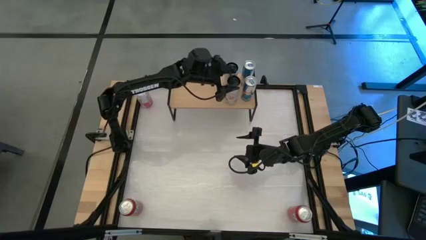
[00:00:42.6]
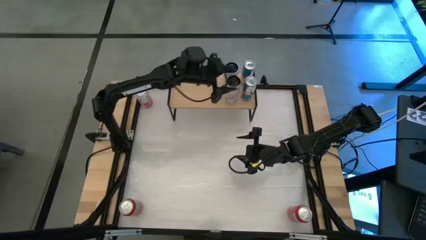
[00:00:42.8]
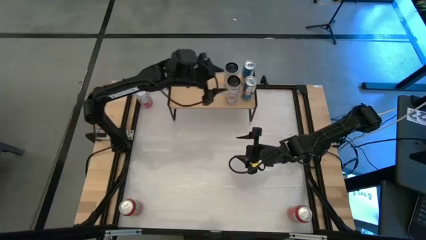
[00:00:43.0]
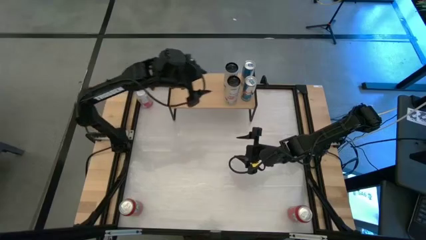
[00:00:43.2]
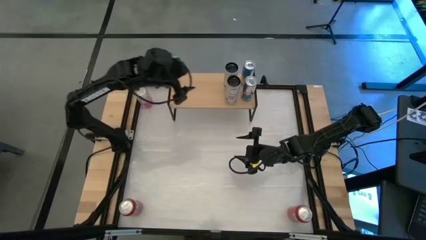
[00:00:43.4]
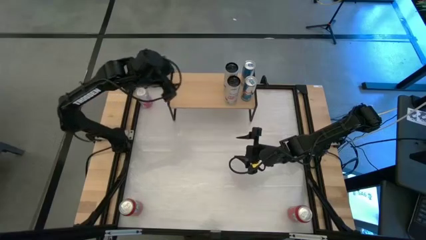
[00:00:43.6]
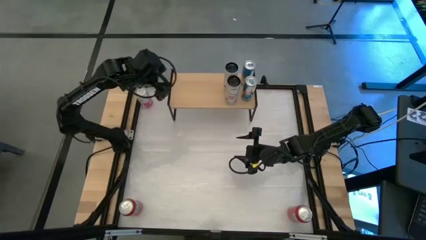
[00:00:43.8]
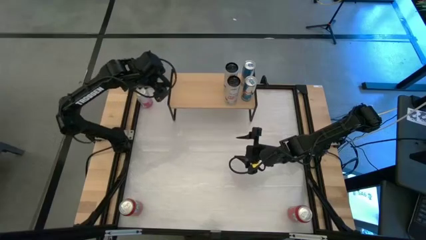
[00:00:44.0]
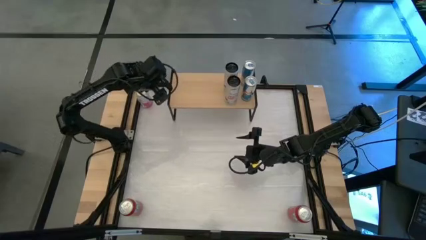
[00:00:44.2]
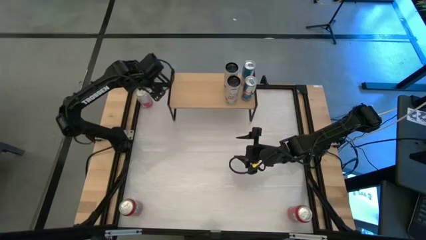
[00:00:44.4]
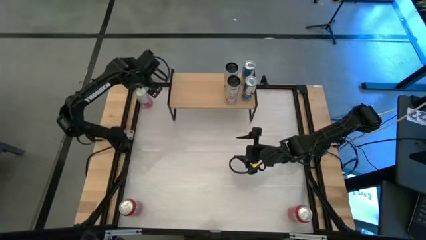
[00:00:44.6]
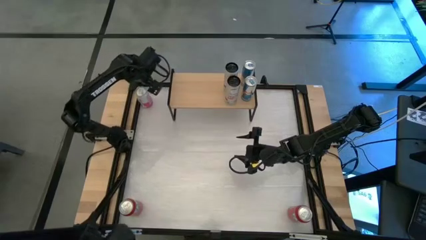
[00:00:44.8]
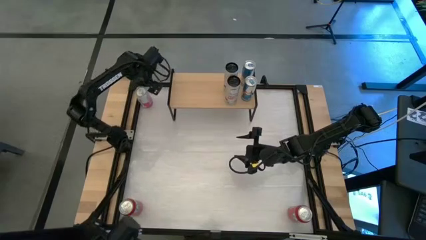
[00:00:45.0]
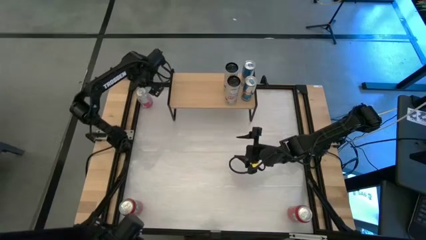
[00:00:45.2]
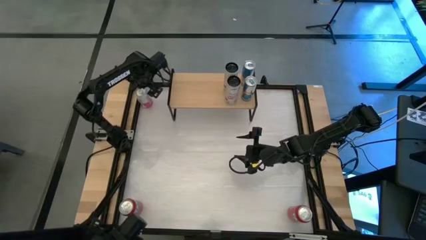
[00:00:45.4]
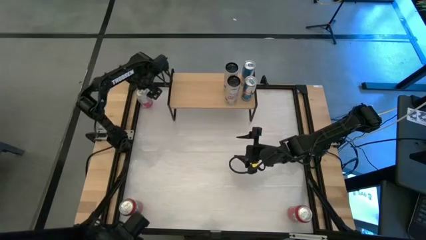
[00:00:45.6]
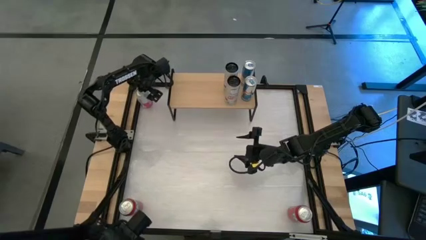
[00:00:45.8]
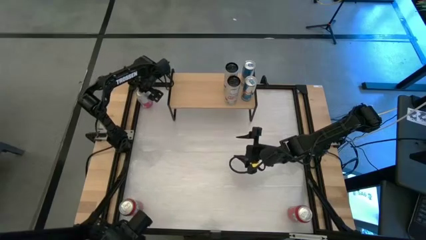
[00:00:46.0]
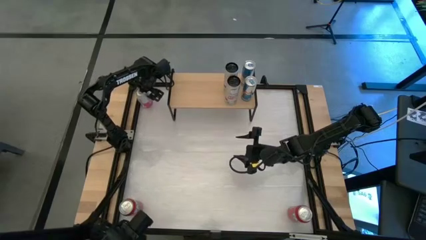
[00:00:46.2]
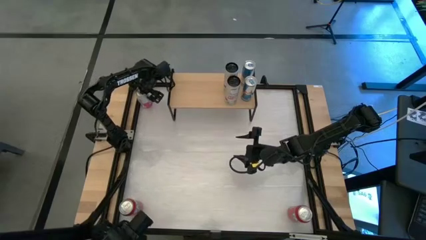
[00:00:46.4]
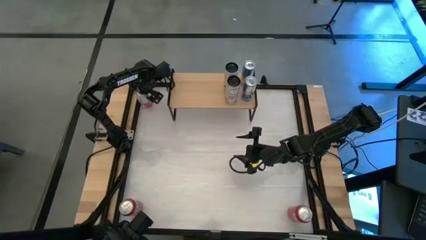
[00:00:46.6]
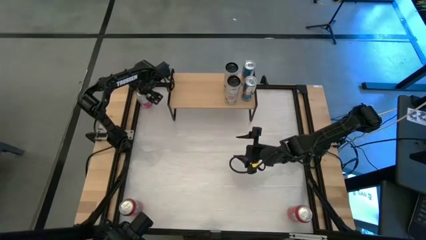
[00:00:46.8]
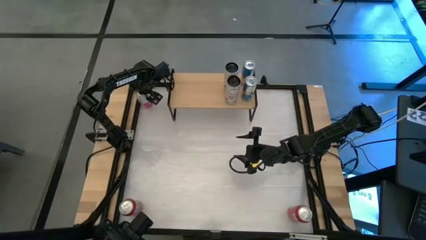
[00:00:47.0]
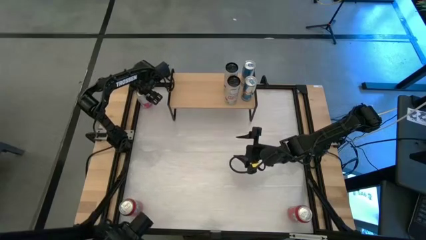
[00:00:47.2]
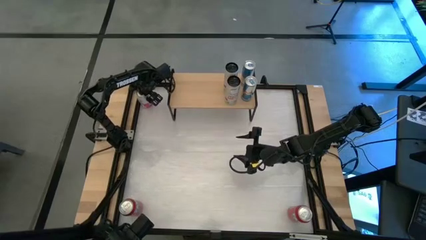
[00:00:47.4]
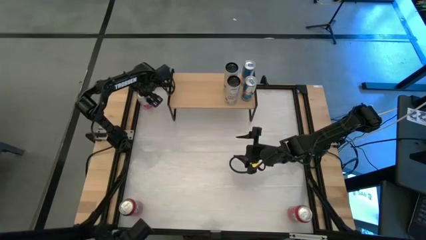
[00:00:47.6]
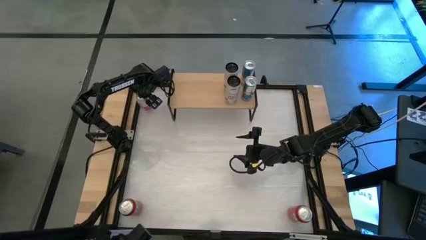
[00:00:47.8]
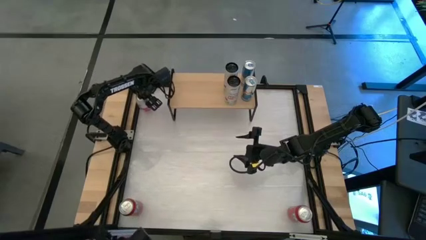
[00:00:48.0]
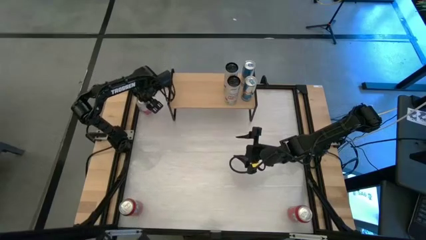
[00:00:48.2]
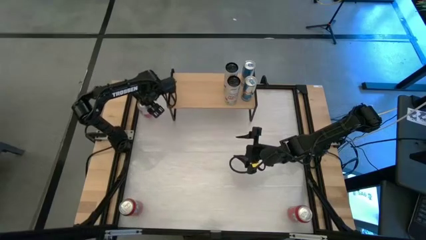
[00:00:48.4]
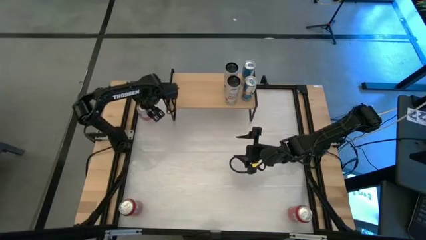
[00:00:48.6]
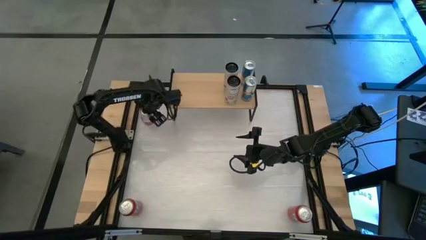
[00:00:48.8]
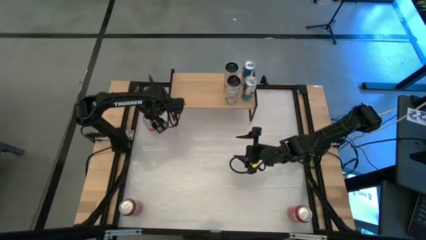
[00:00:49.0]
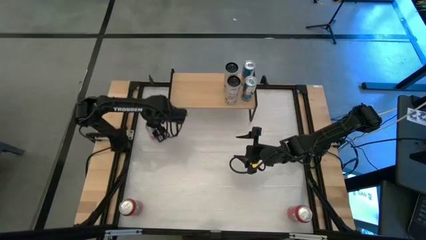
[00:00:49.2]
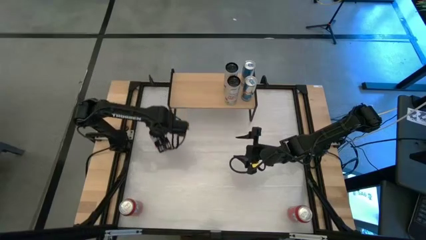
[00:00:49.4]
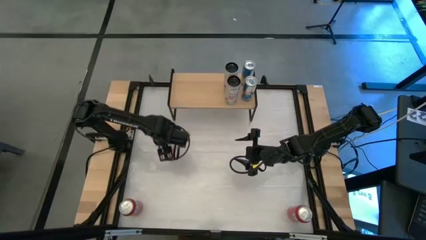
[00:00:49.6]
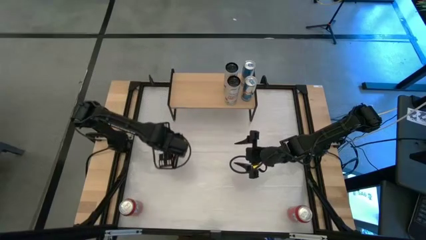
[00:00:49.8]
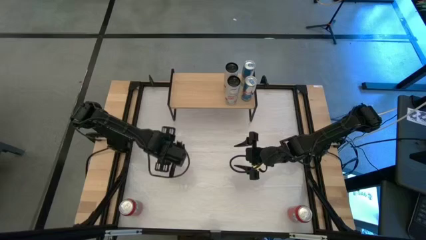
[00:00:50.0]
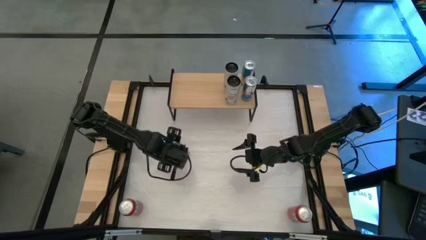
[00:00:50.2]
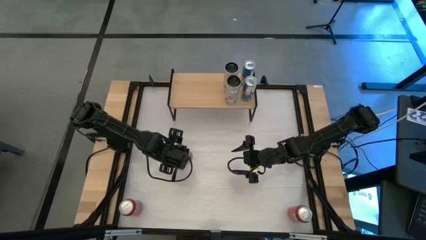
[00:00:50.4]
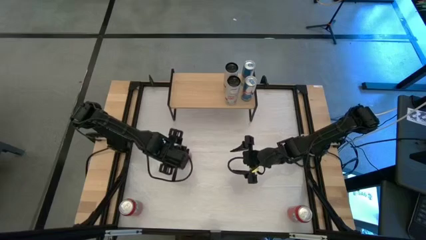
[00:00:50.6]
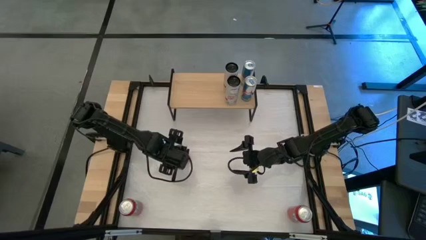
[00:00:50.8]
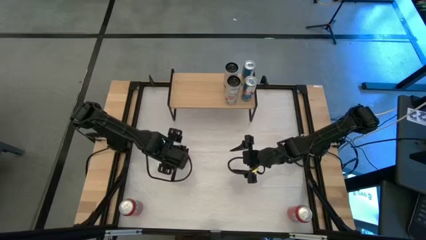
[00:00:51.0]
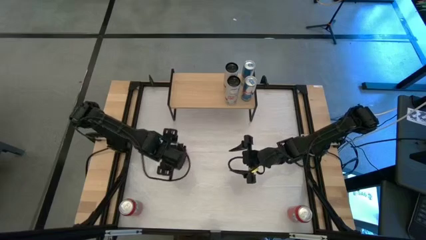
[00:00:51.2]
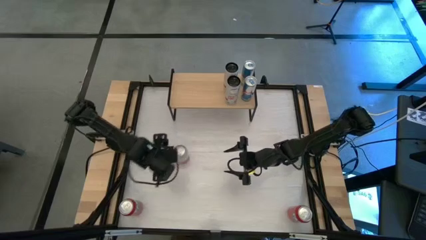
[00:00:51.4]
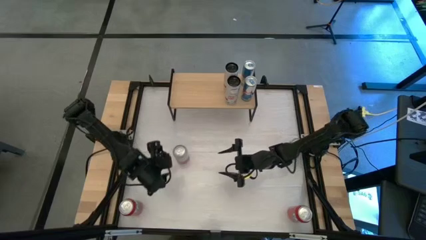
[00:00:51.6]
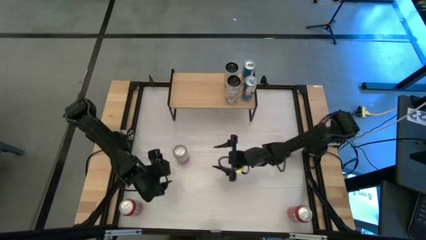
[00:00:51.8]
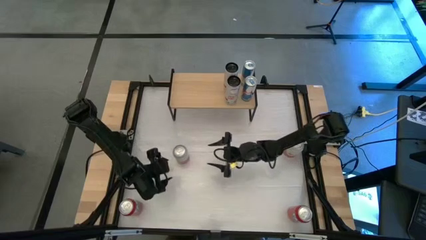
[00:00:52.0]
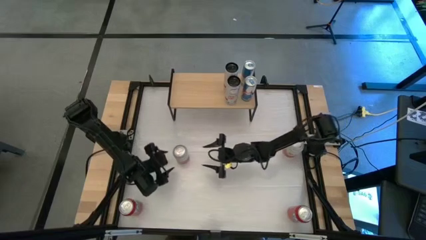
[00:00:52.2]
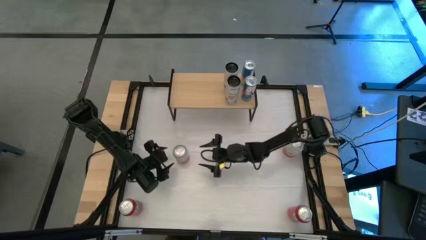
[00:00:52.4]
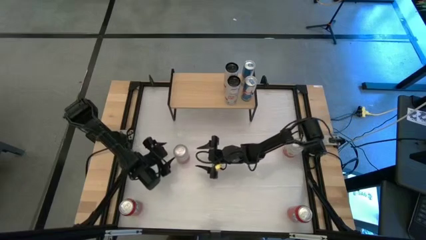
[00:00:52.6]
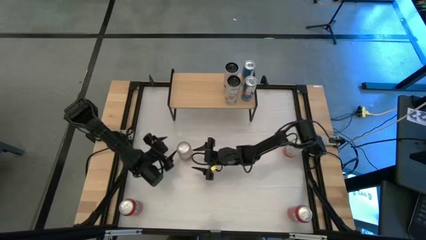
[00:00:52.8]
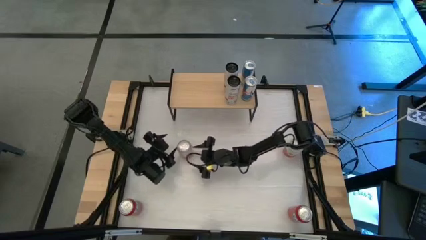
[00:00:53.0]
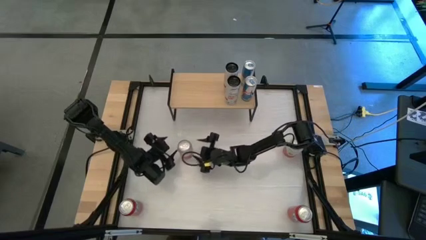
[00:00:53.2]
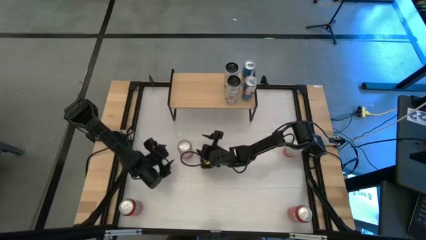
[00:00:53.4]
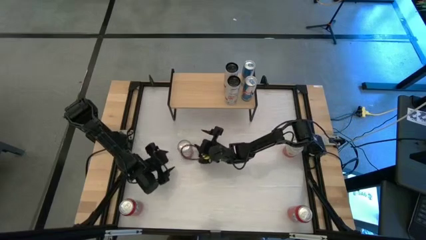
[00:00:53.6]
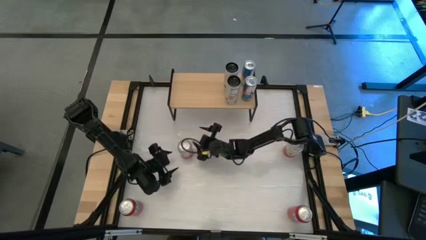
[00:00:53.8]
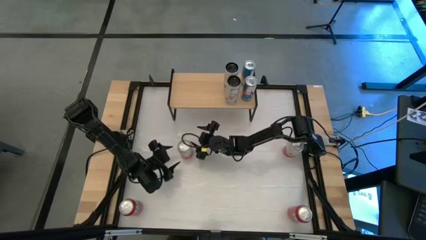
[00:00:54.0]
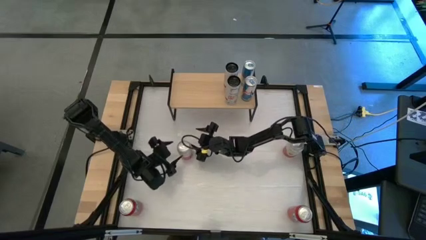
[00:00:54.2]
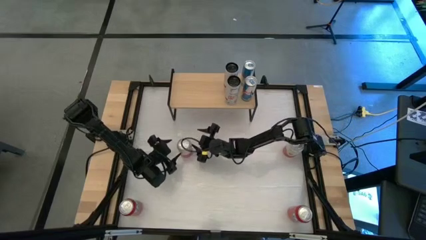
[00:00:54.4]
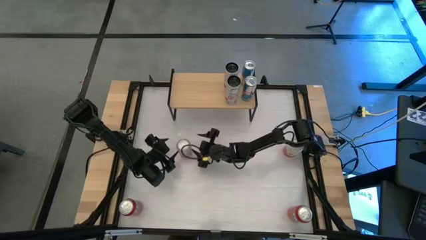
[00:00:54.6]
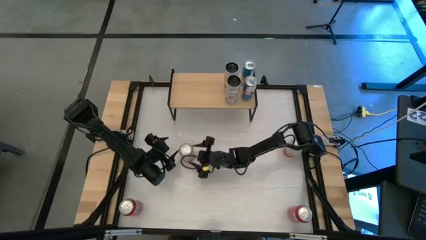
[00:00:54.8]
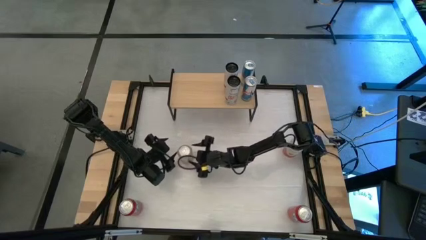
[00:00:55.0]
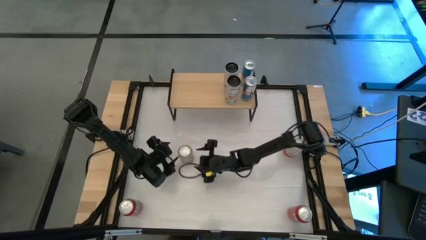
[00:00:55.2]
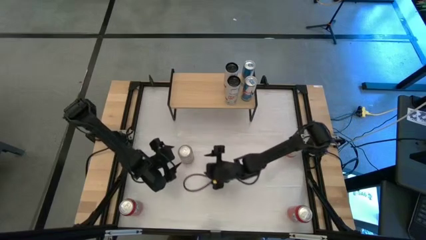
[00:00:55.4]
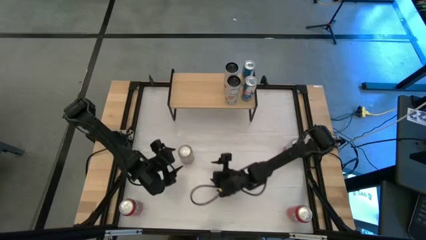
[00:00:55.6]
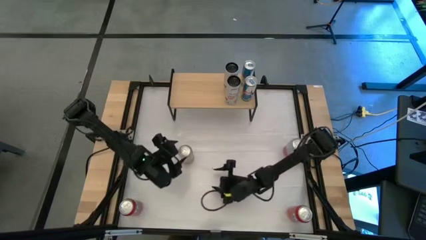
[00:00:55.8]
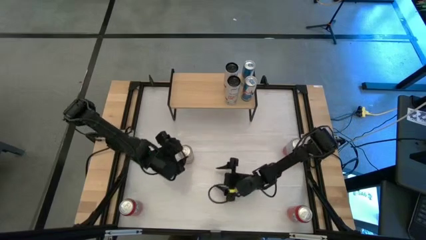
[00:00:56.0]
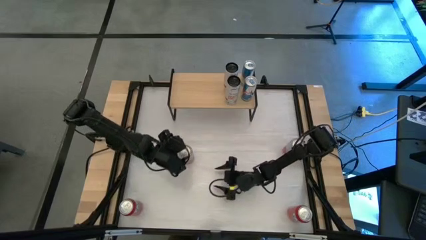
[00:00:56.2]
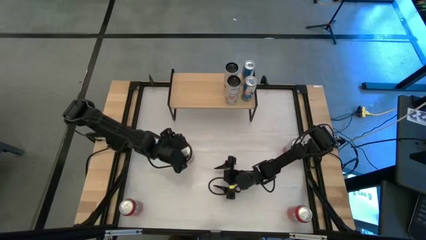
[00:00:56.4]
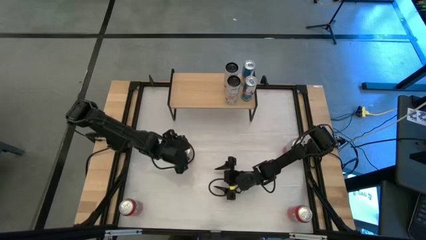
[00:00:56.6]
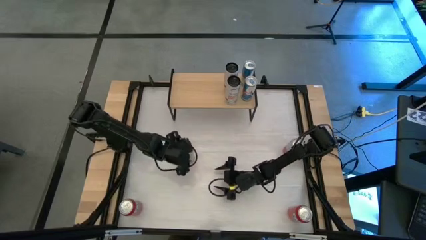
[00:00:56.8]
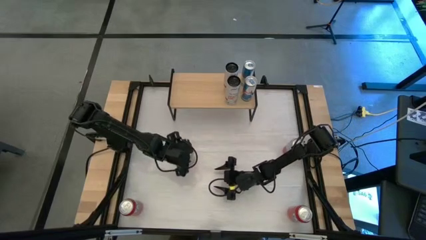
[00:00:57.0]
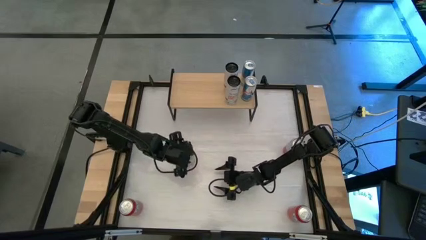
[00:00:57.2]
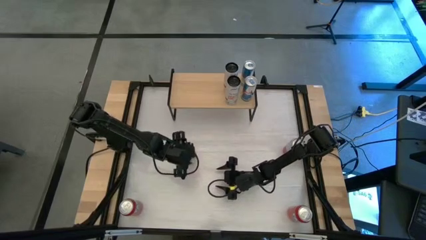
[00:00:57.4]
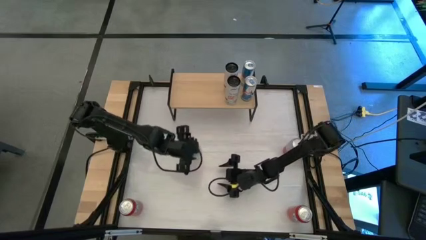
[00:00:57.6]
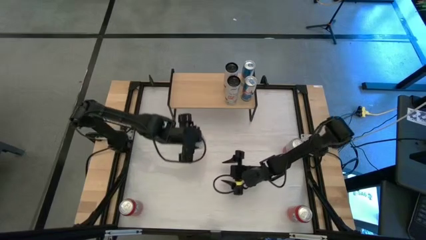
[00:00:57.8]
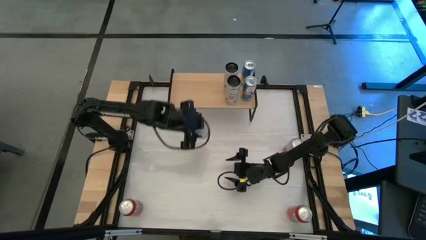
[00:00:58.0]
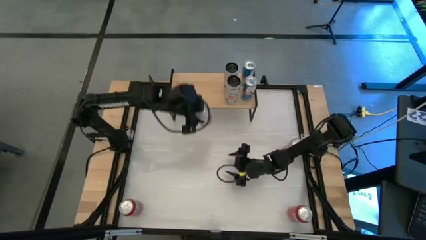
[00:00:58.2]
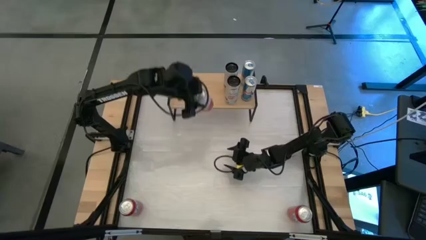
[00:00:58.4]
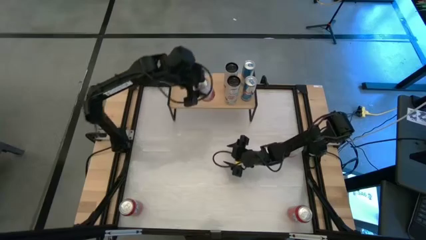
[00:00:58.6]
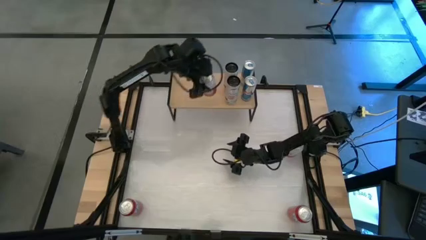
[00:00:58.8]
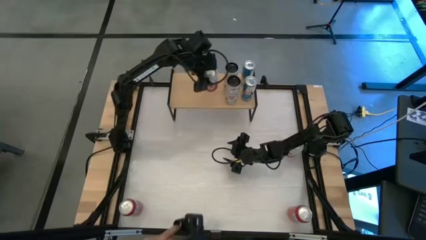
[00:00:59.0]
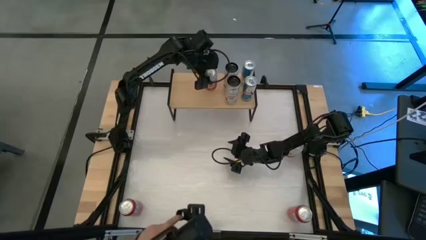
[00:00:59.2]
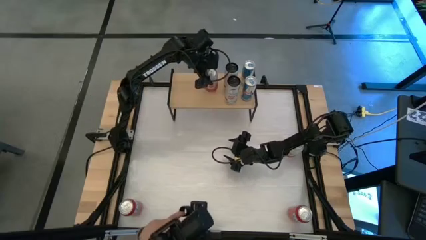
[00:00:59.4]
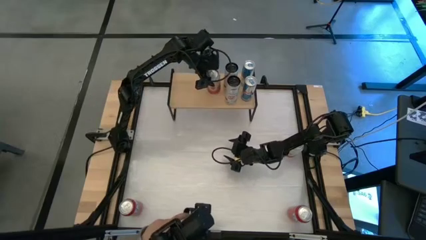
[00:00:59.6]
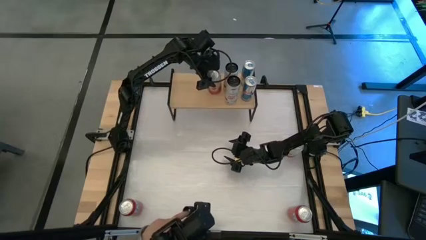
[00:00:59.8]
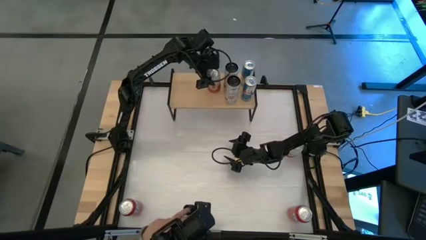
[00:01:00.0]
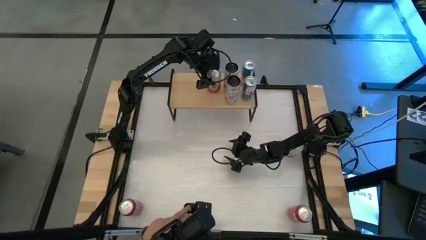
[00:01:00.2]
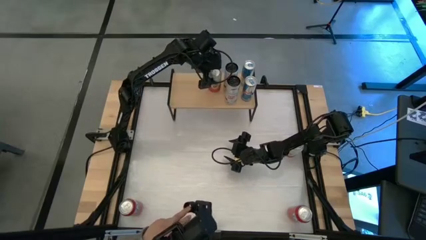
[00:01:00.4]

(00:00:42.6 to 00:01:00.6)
Task: Place canned beverage on shelf
Put the left pink white soda can on the shelf
